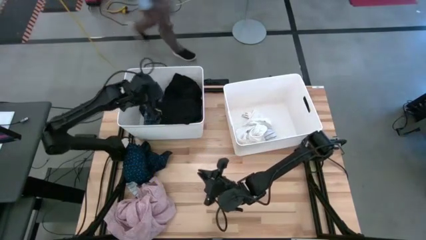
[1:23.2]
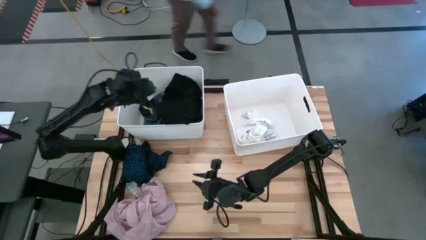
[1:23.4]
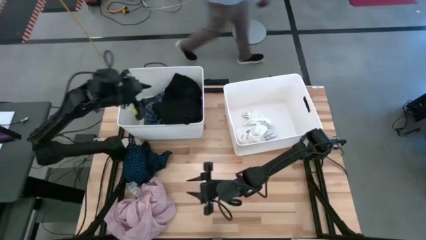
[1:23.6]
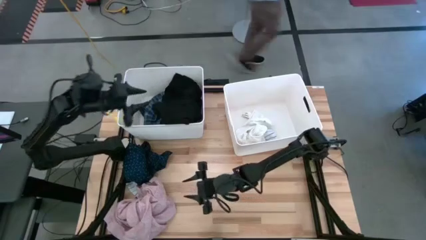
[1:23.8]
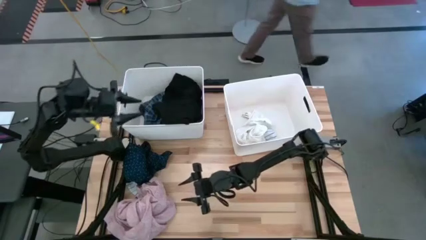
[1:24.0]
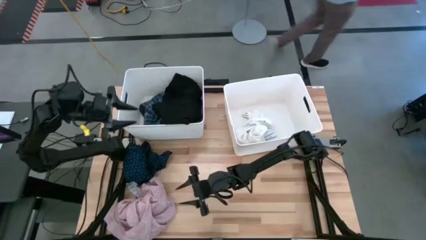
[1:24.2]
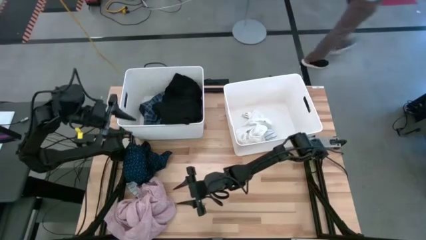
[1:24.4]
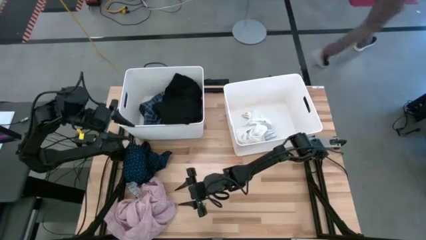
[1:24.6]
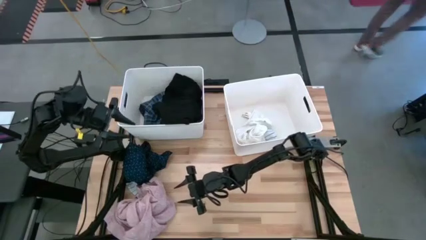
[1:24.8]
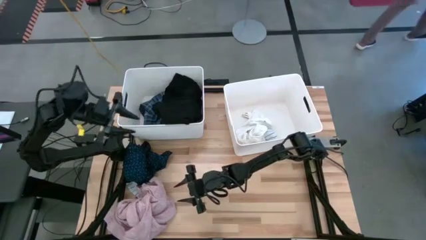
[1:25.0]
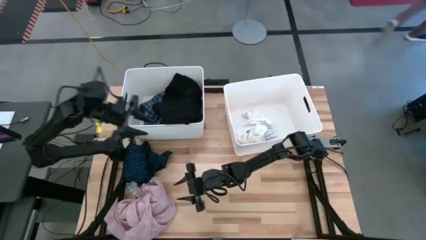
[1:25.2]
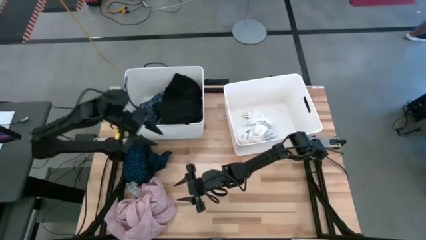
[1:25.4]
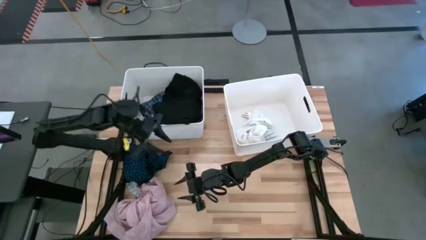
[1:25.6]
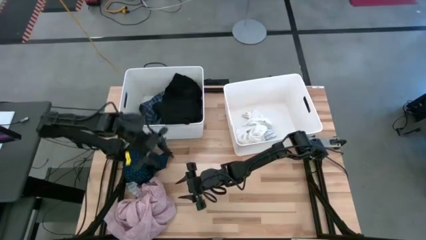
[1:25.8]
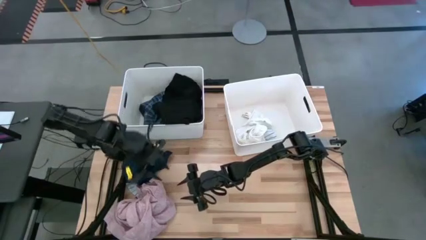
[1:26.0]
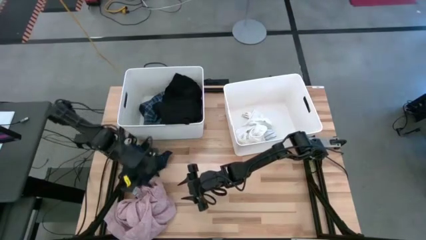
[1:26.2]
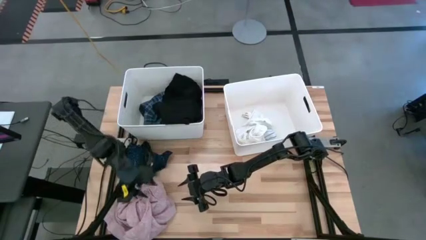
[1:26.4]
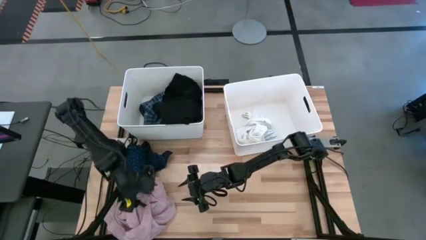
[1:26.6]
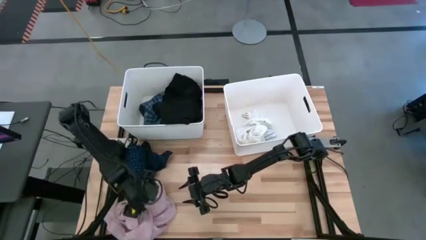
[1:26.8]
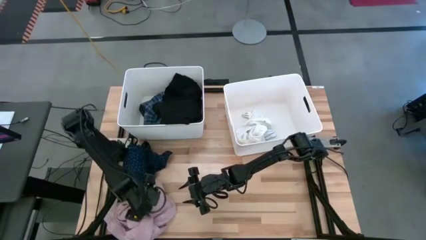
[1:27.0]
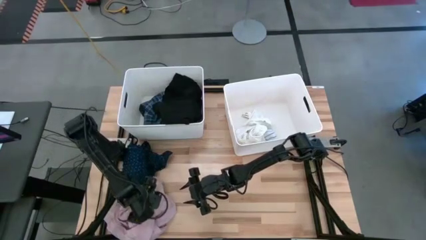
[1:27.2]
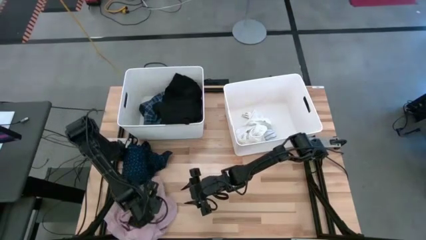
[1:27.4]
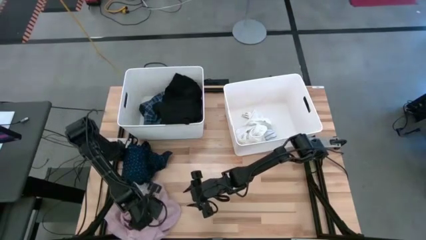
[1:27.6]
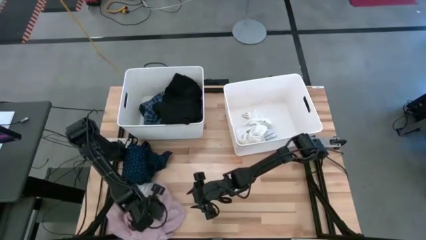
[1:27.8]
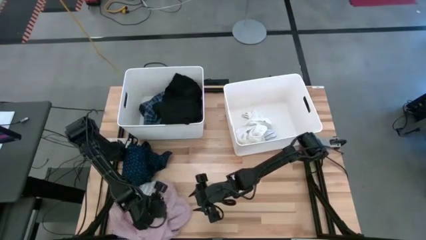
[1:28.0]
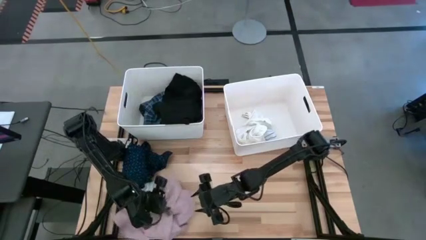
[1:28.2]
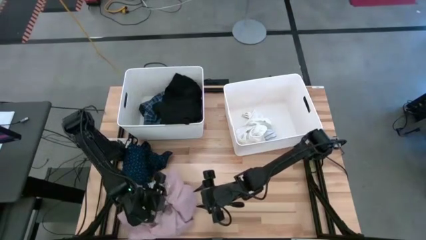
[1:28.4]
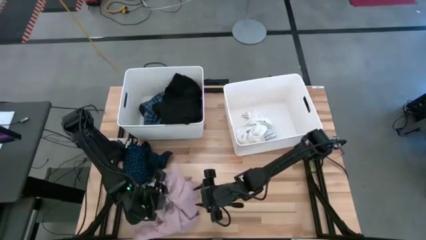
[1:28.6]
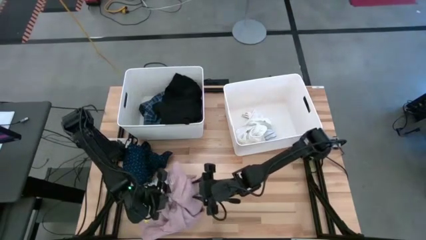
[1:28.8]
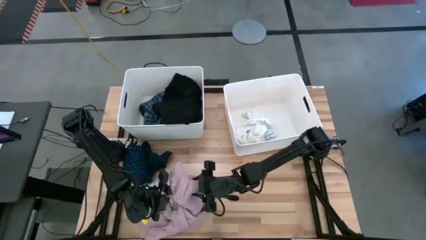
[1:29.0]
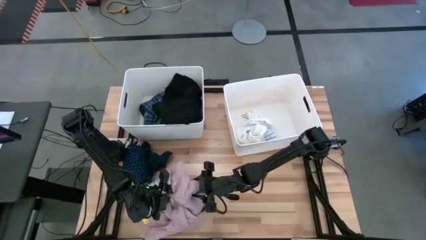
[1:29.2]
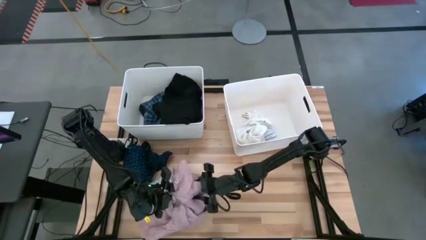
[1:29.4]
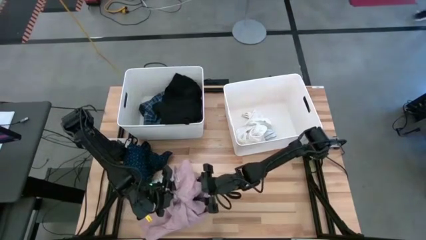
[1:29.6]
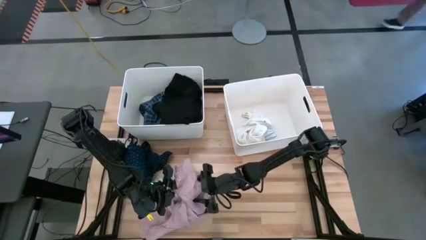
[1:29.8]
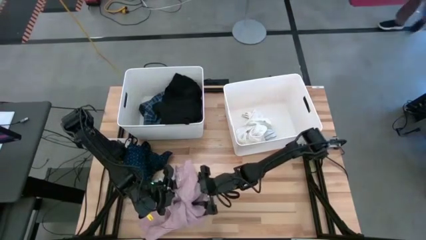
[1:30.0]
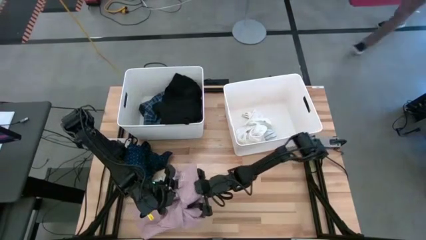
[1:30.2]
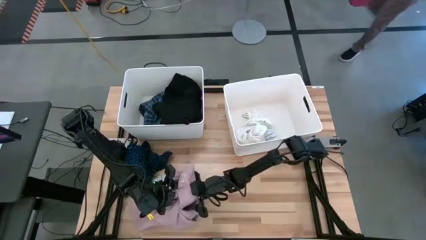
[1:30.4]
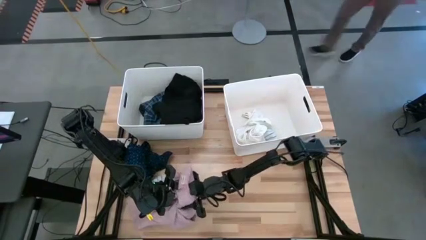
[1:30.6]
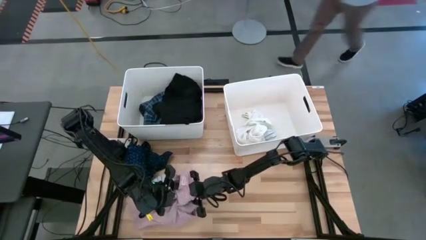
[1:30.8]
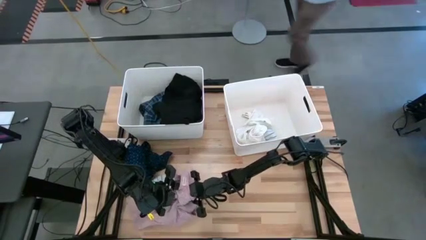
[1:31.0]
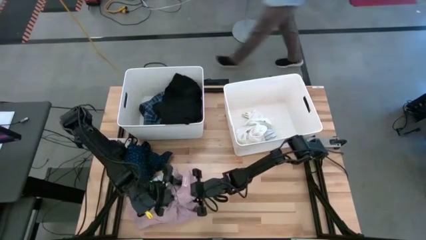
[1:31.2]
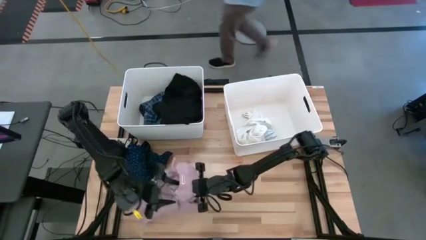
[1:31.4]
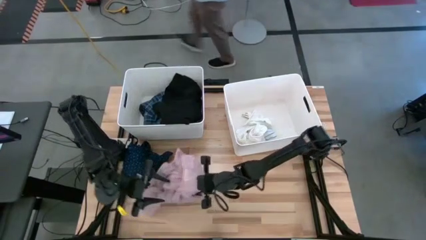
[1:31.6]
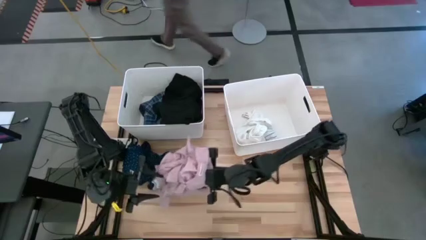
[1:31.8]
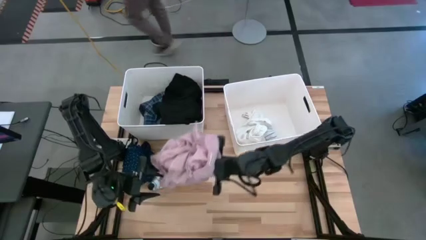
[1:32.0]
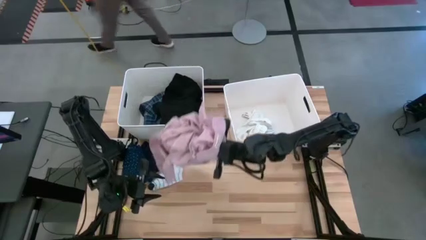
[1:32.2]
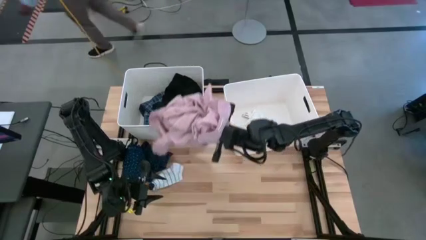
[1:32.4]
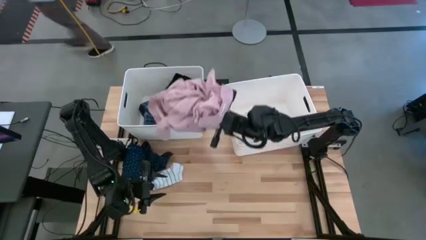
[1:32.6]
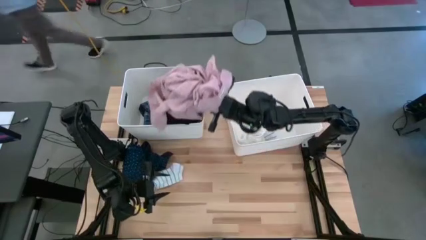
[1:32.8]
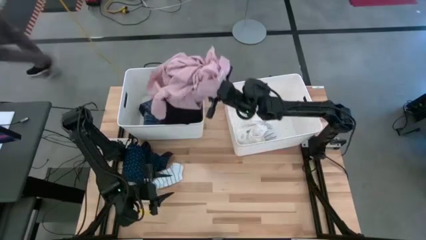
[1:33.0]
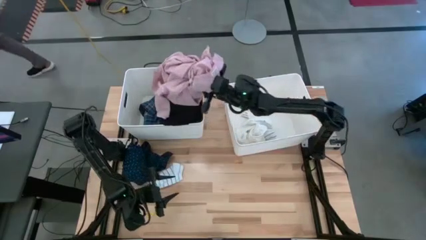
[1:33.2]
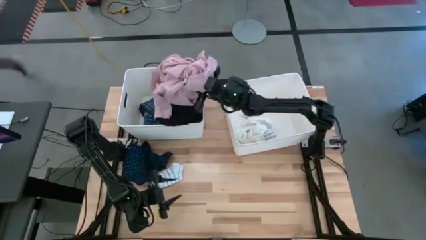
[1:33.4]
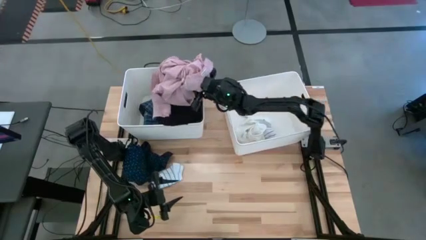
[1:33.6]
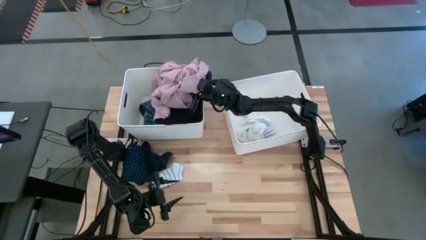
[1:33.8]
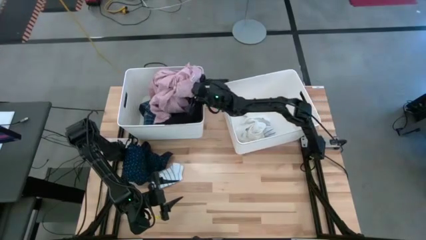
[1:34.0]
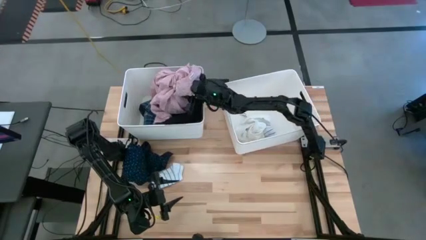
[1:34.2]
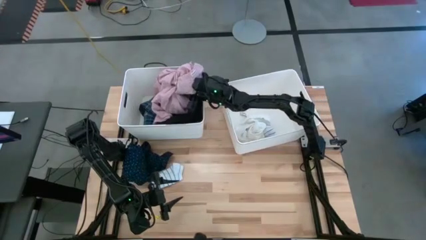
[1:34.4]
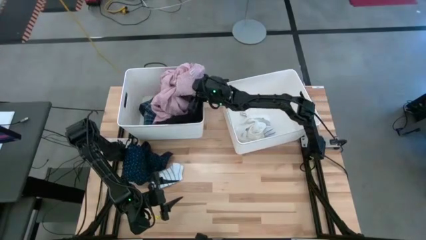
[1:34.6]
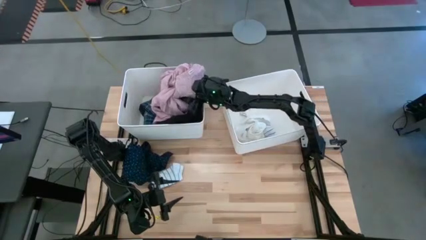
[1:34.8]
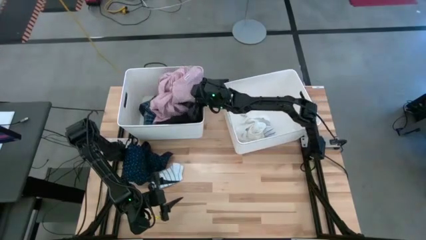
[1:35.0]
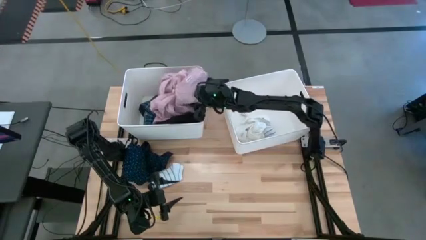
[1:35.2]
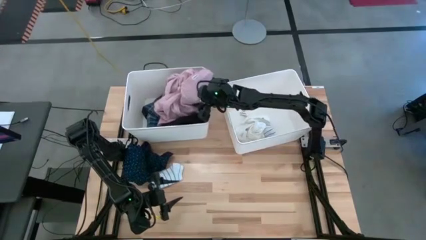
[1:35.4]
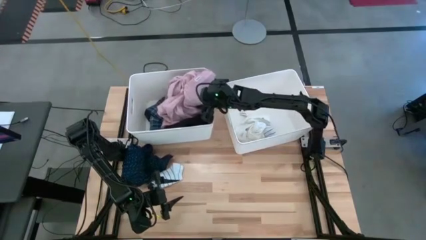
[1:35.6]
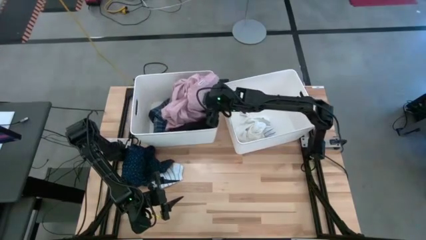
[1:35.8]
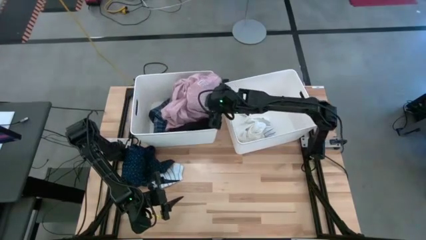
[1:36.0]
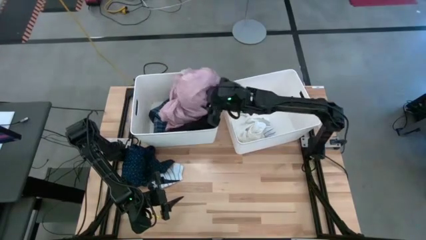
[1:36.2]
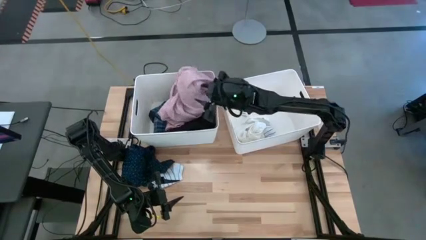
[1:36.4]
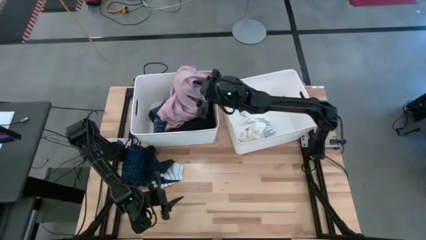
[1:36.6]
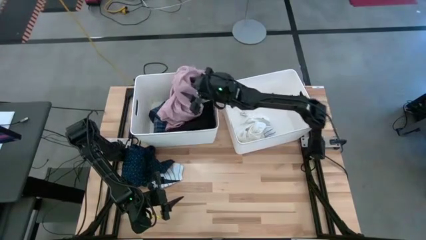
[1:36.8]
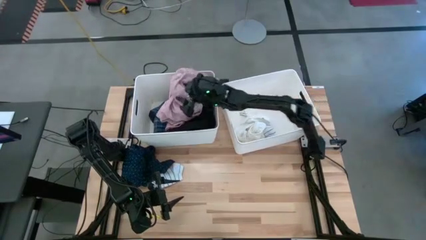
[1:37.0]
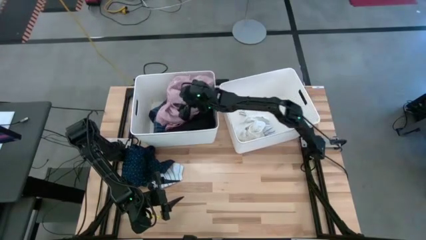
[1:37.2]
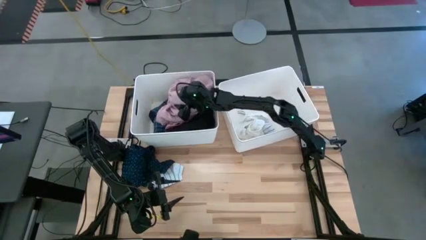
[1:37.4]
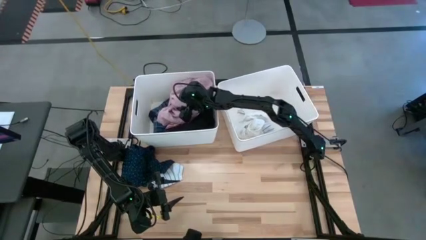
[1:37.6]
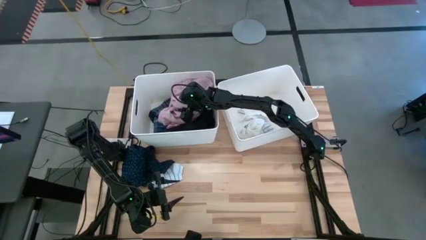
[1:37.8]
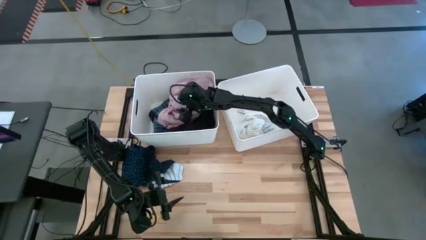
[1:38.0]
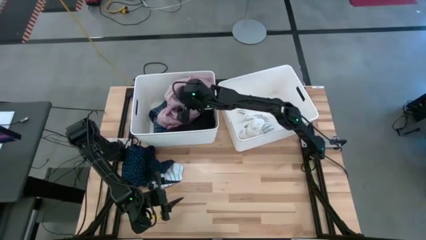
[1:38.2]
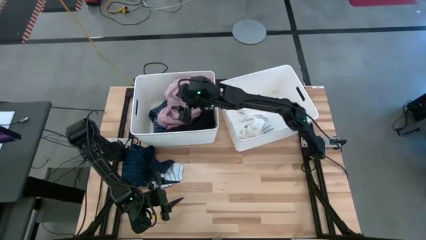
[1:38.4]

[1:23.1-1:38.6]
Task: Sort clothes
Put the pink long-sleeved shirt into the left laundry bin
